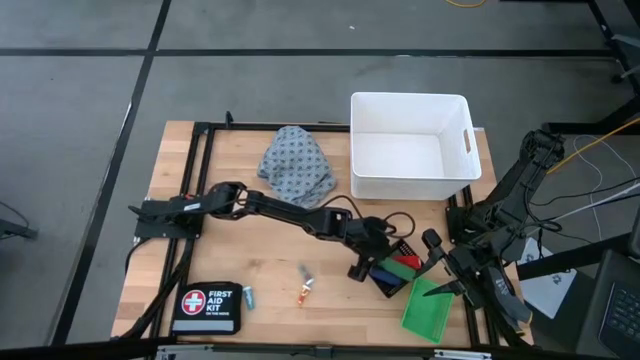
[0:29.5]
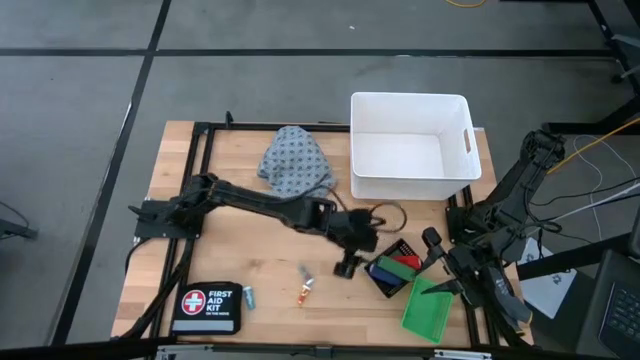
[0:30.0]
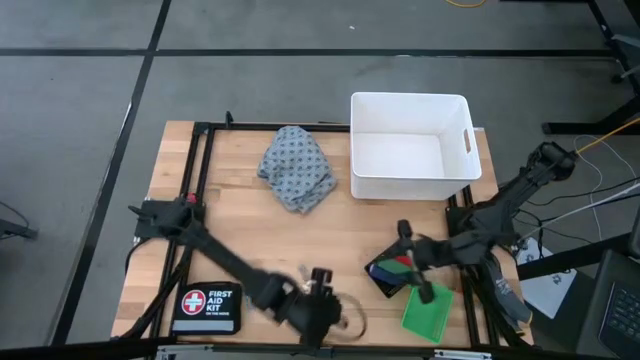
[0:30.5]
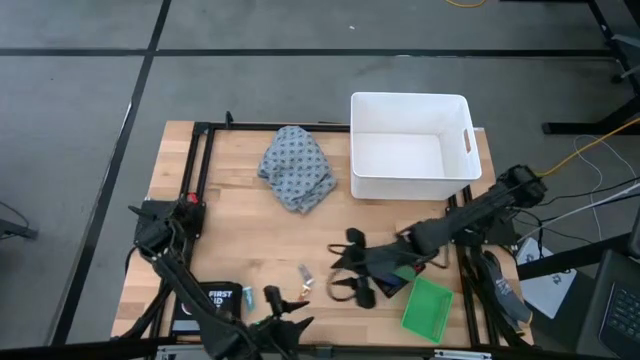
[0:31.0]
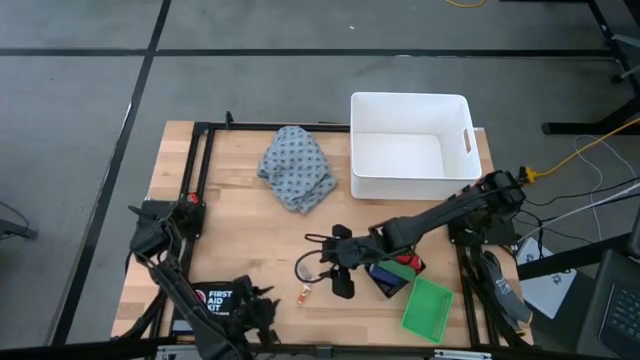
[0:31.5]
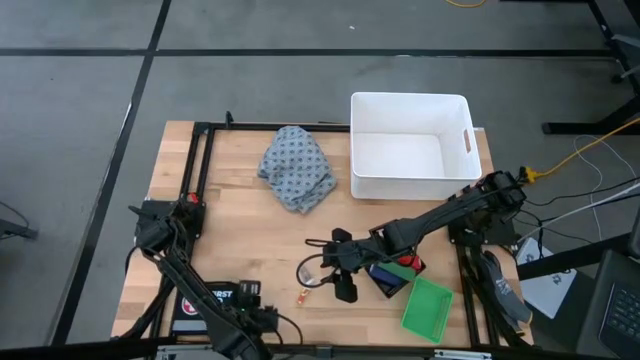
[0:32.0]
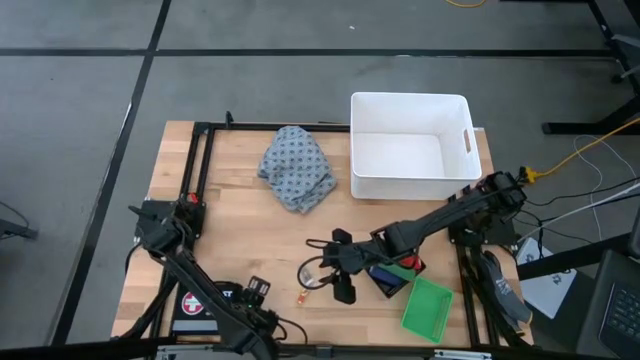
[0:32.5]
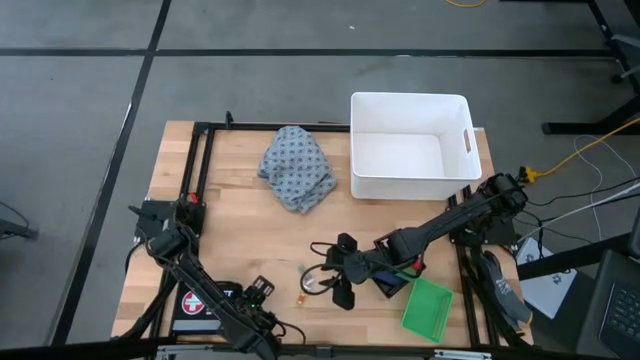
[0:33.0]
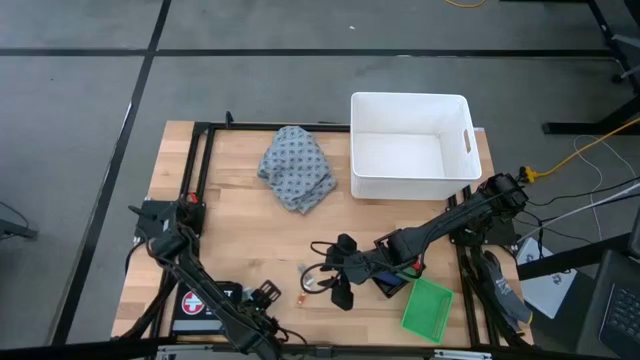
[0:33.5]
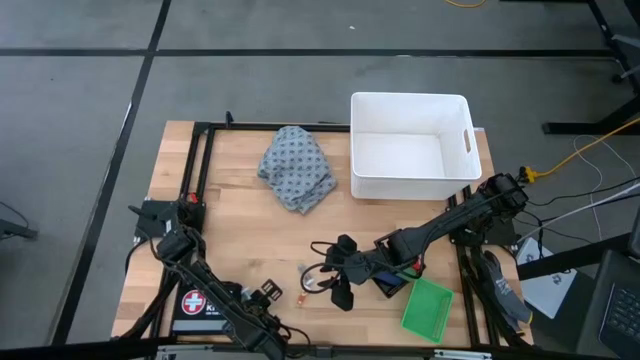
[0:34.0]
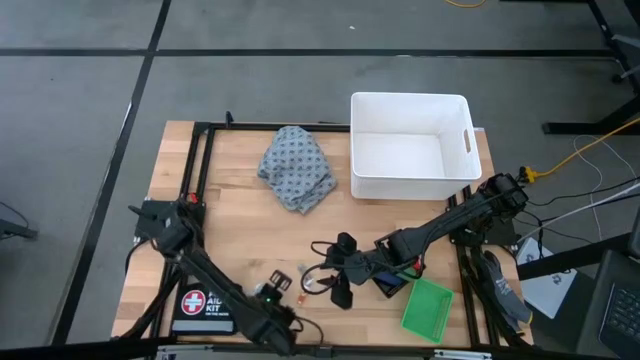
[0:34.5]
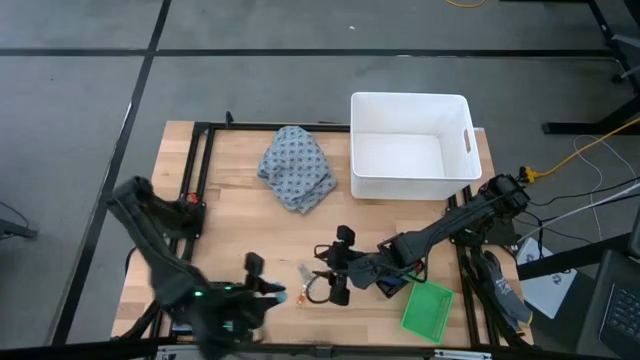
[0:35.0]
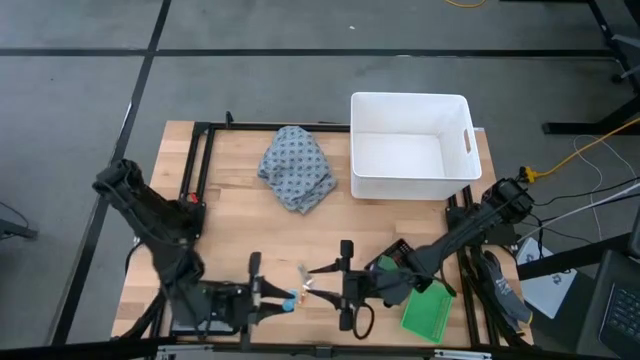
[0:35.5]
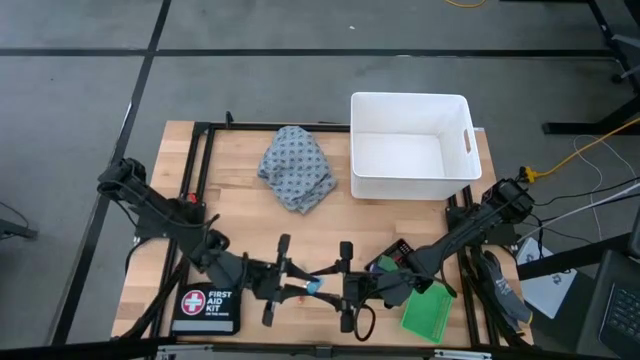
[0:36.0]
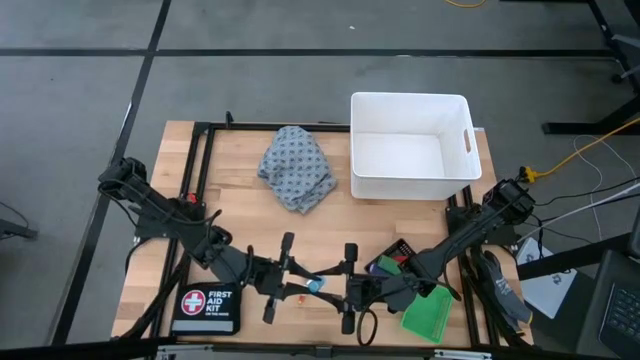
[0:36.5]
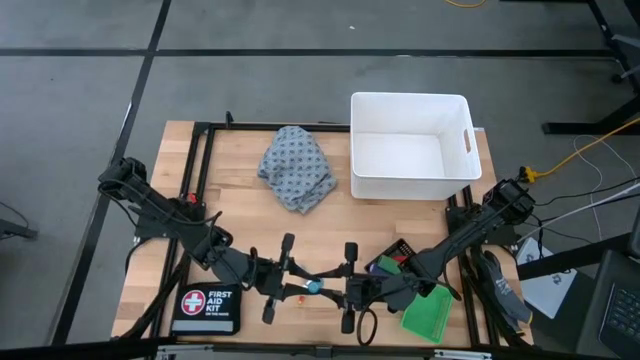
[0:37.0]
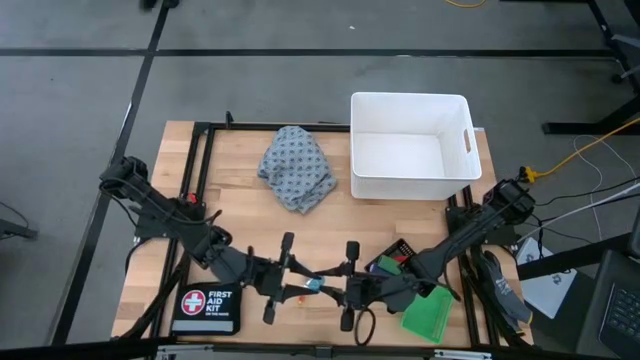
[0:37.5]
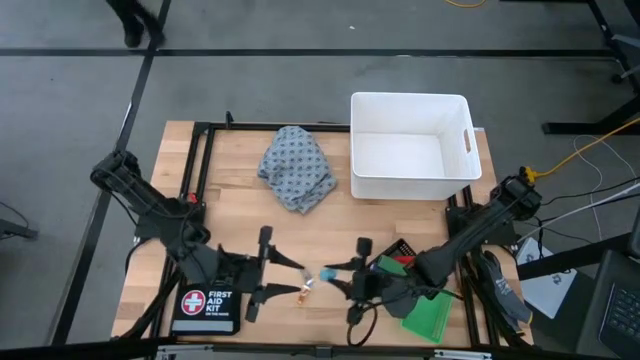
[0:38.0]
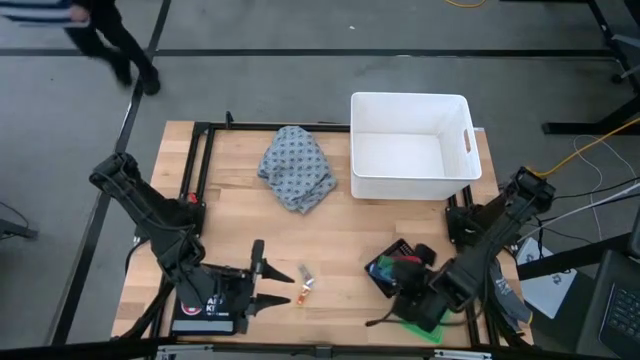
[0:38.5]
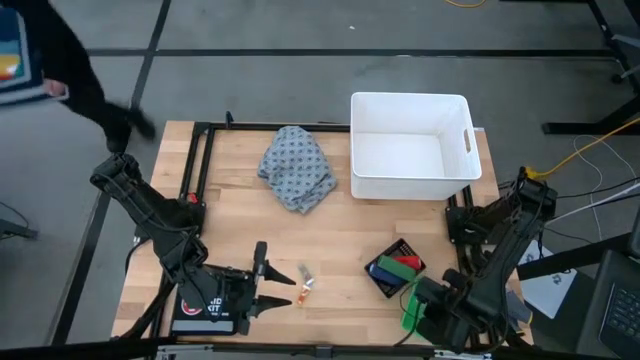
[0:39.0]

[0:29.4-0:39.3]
Task: Pick & Place Medicine items
Put the blue pill bottle into the green bin

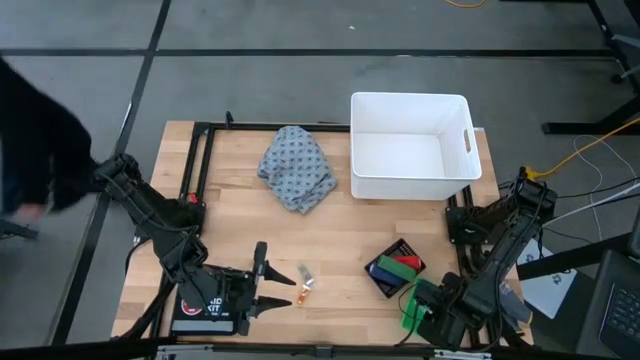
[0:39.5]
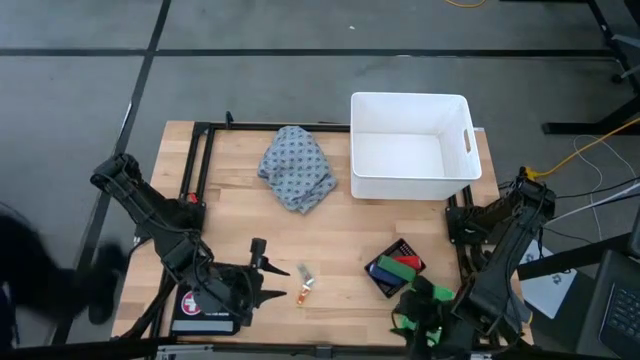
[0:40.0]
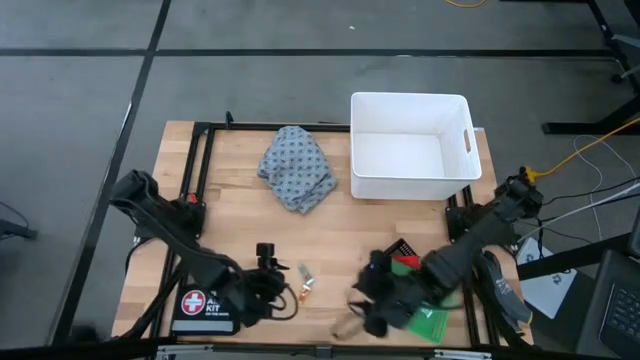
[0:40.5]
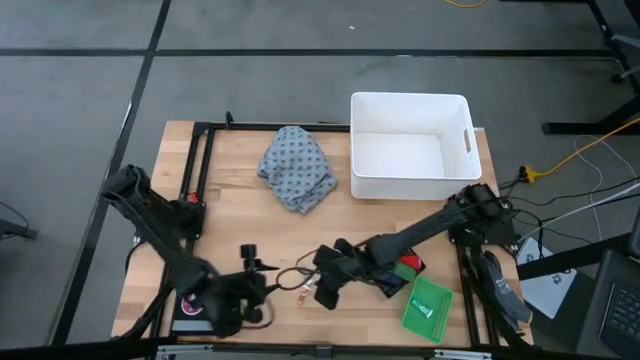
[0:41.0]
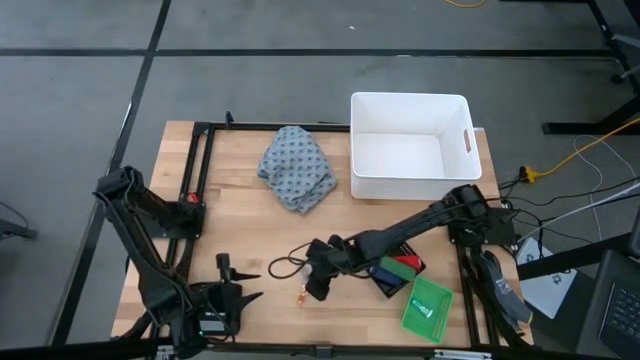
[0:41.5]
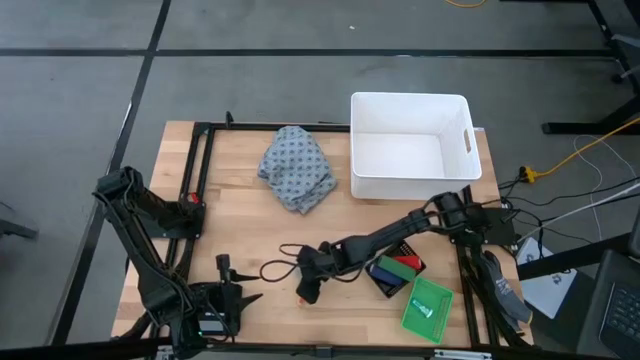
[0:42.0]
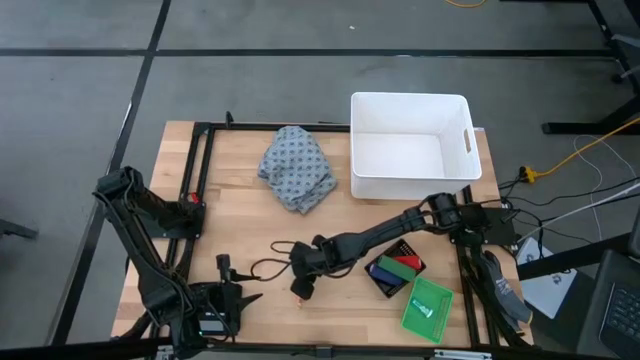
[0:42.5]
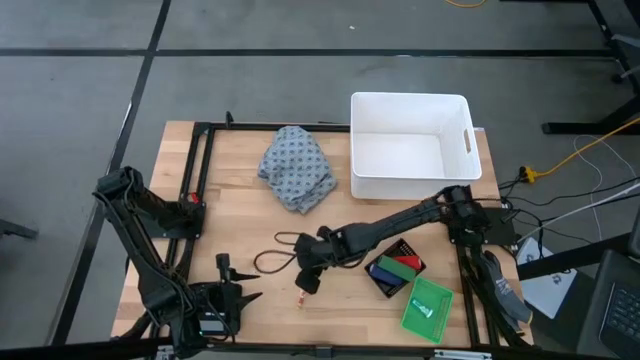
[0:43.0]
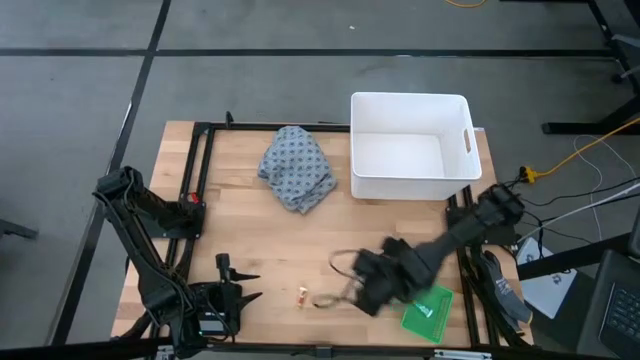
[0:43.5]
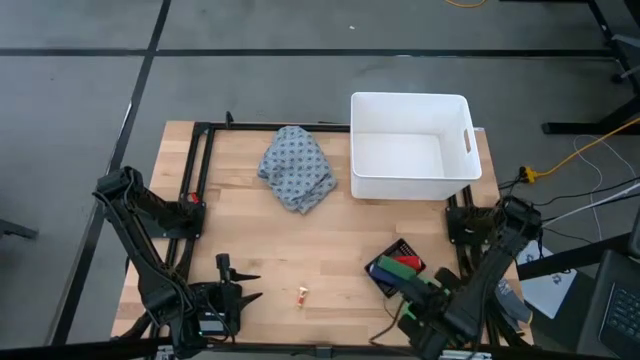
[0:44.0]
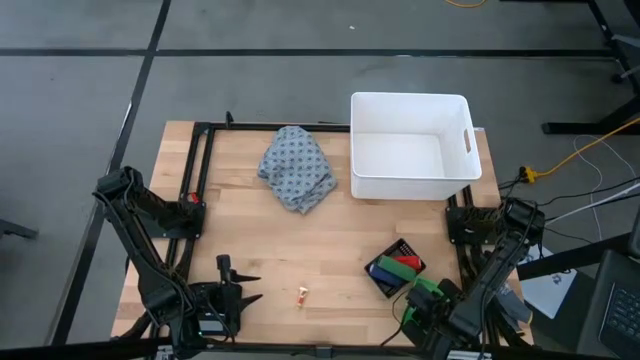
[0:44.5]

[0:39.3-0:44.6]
Put the green pill bottle into the green bin

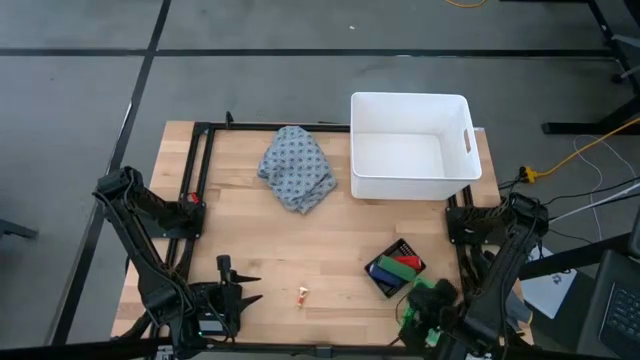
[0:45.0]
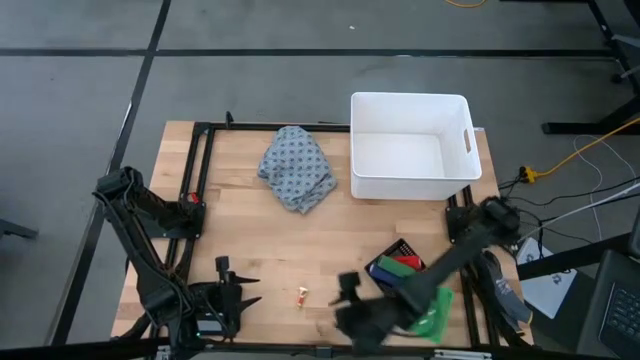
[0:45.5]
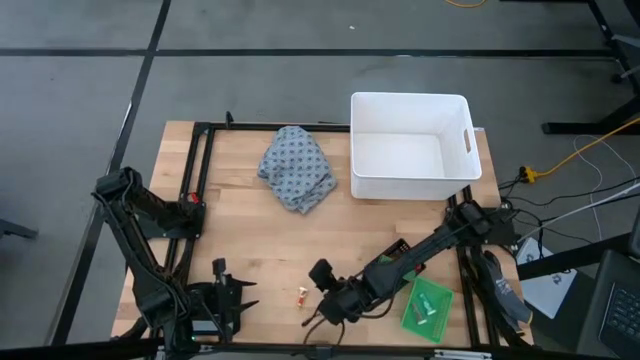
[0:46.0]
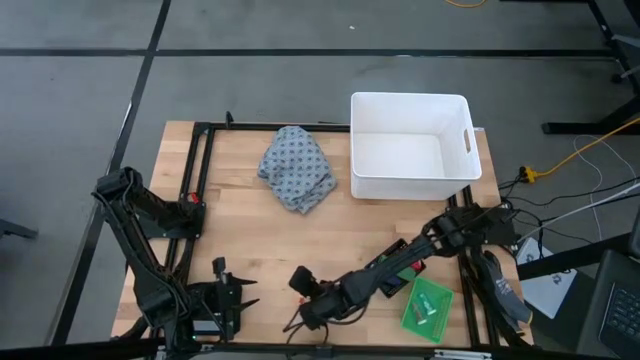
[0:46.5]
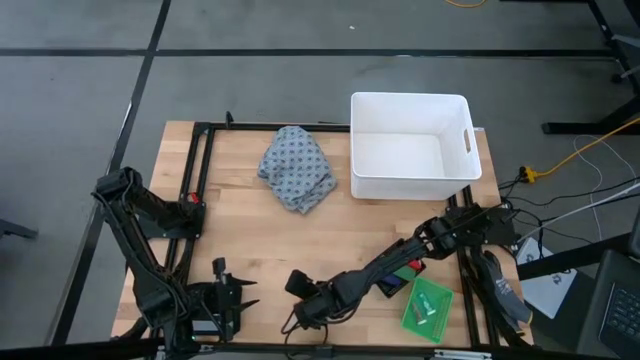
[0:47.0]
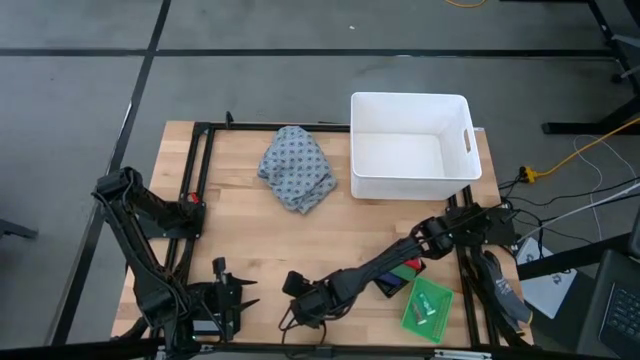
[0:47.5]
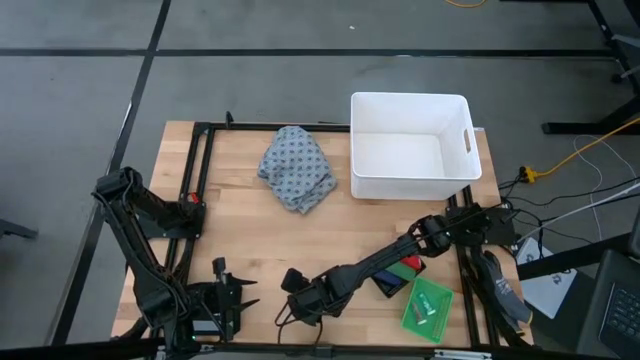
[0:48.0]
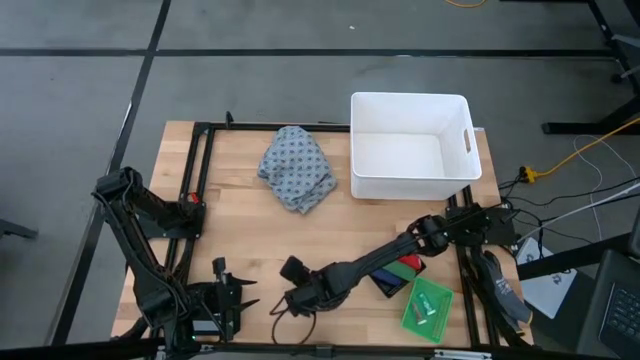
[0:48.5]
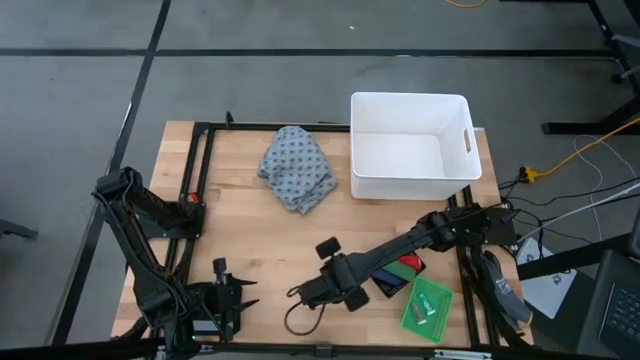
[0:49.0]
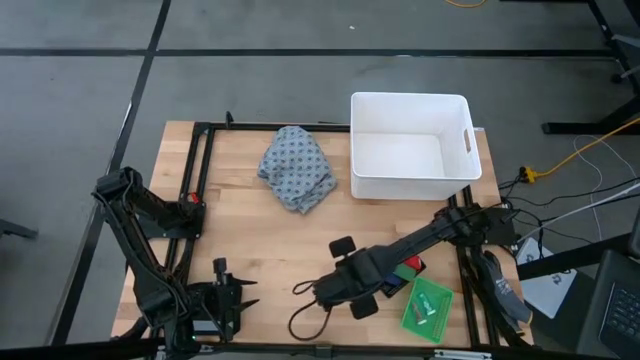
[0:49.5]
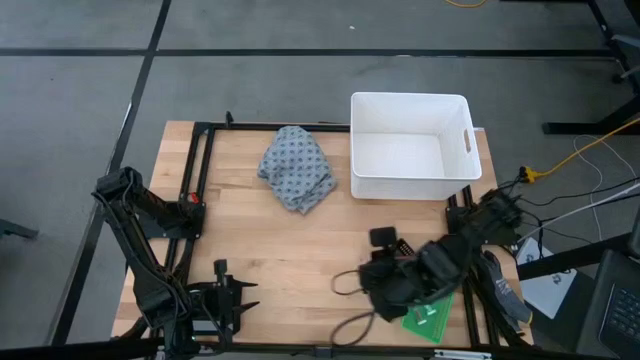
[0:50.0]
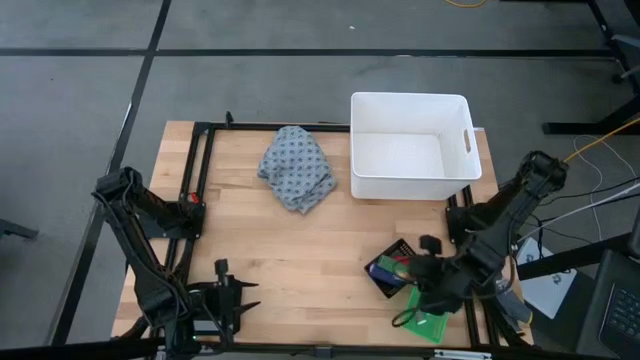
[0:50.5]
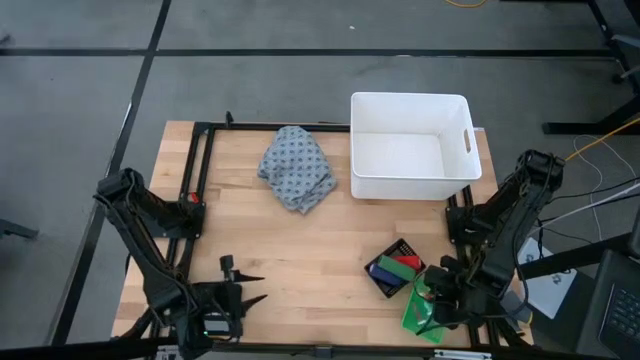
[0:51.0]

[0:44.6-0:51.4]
Put the yellow pill bottle into the green bin
